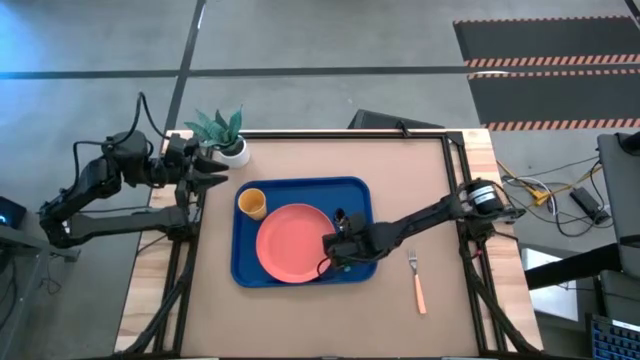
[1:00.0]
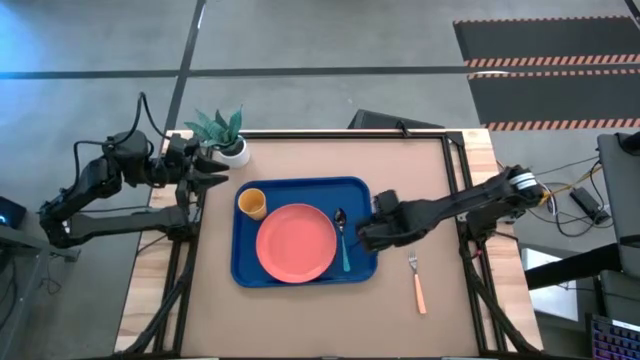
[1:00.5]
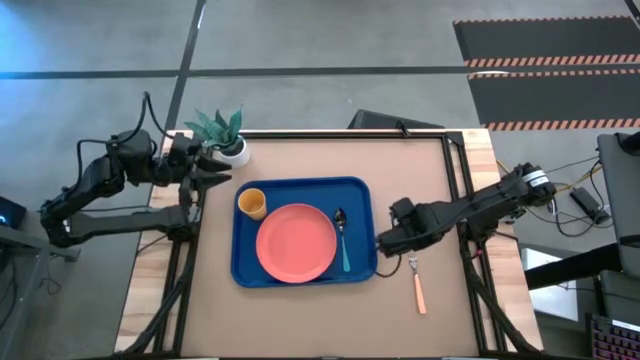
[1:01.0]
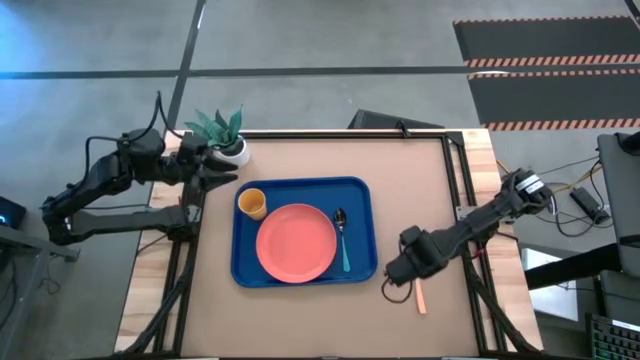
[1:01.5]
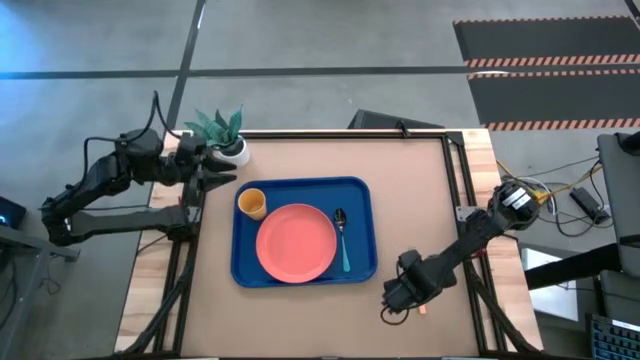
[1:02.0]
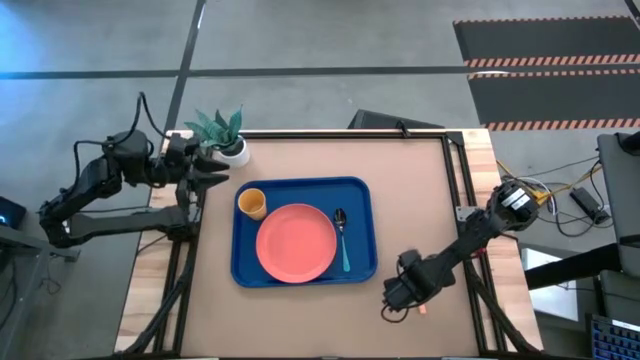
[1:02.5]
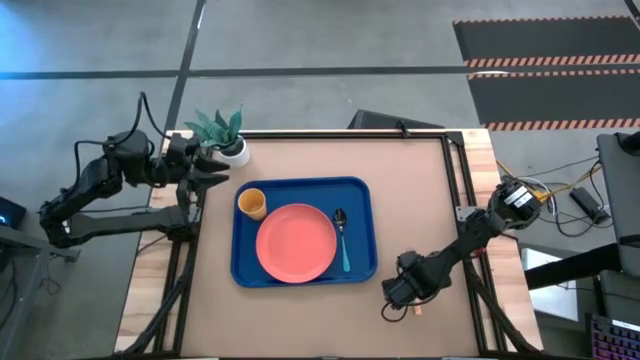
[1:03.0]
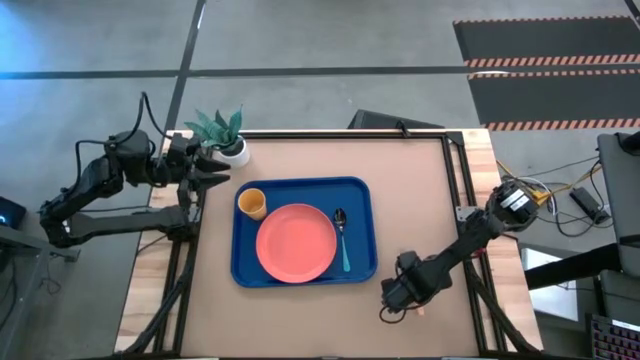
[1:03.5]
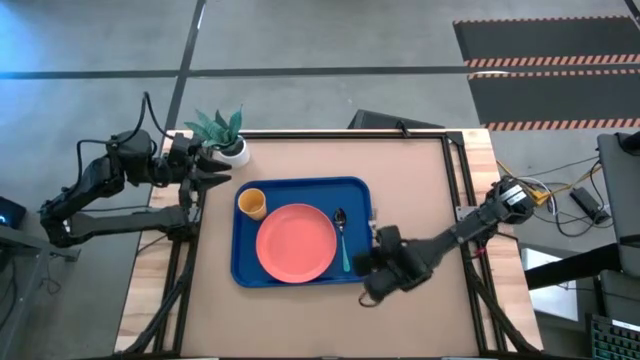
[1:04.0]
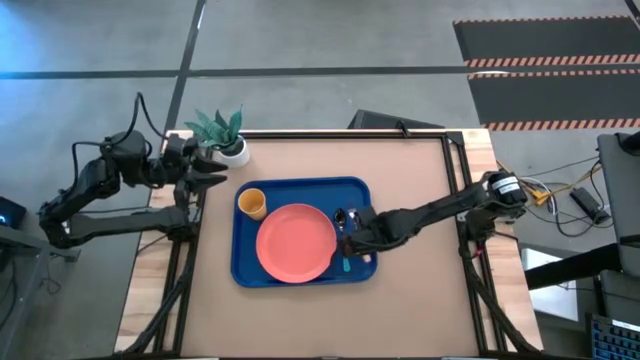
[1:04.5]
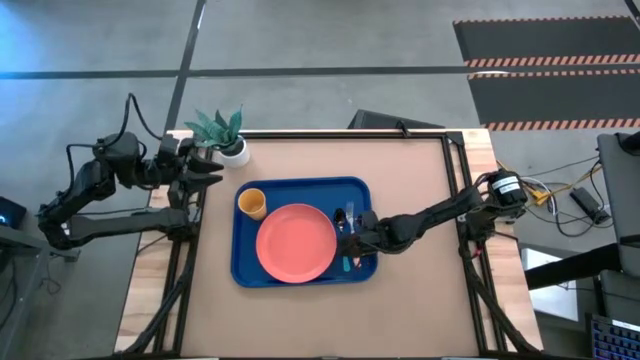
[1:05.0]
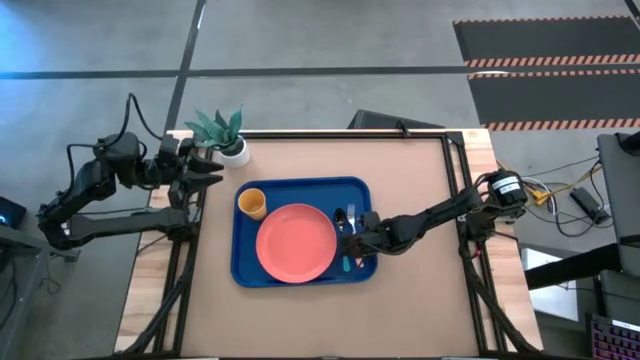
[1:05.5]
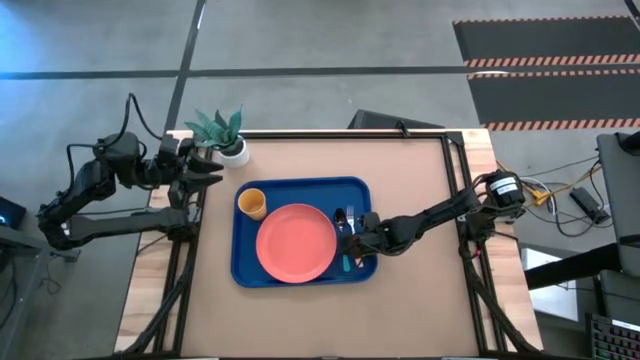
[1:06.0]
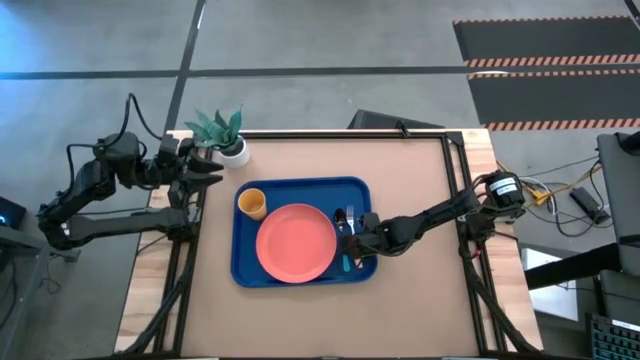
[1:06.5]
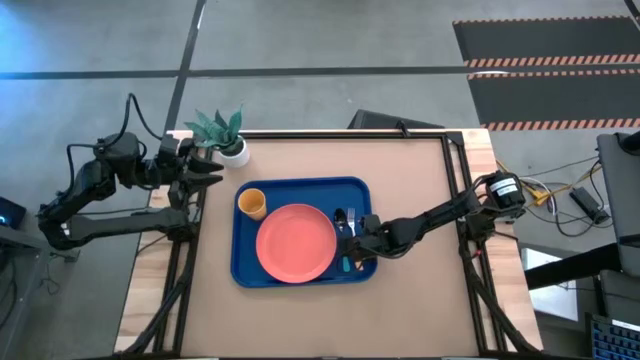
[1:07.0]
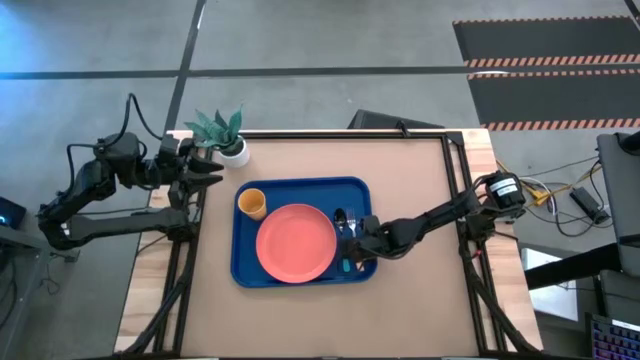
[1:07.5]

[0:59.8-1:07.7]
Task: Pick and place plate/cup/fork/spoon on tray
Put the pink fork on the blue tray to the right of the blue spoon

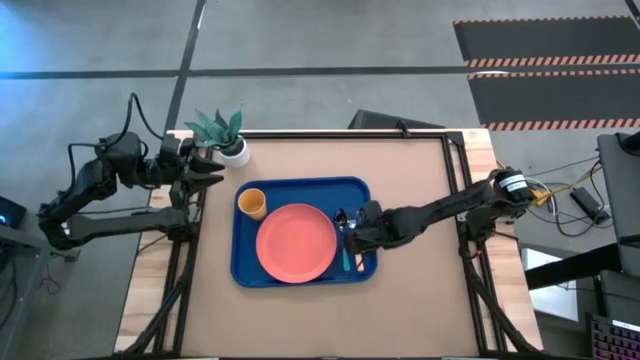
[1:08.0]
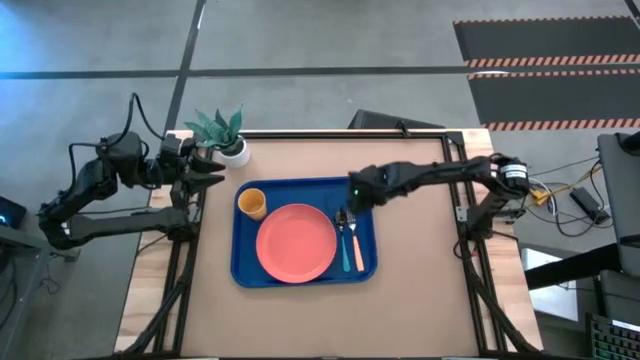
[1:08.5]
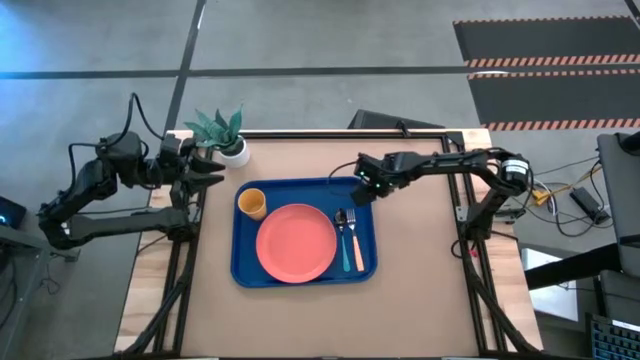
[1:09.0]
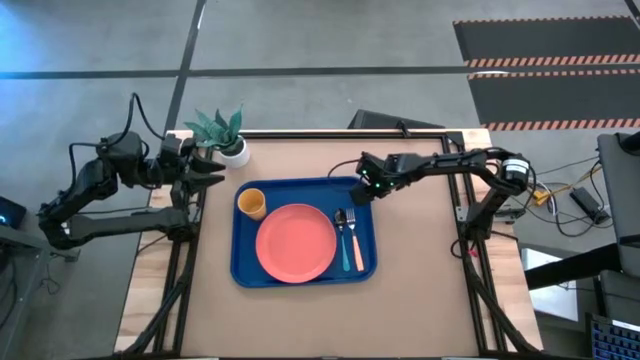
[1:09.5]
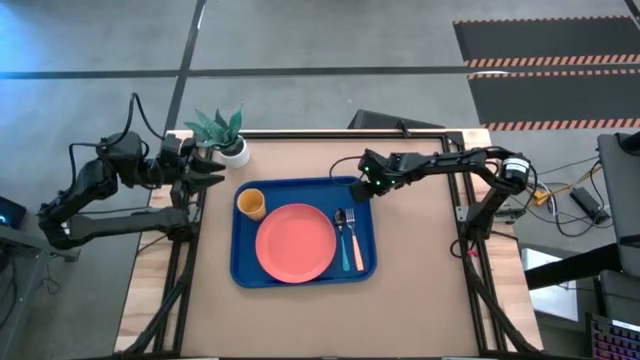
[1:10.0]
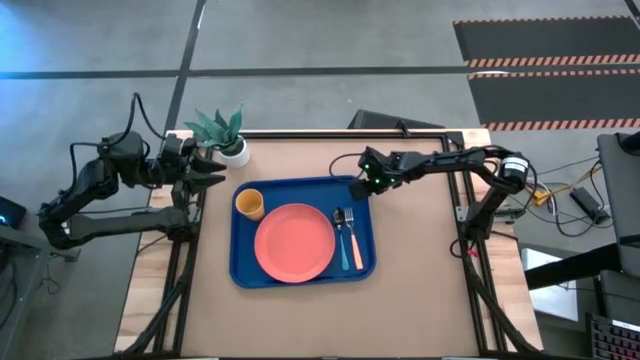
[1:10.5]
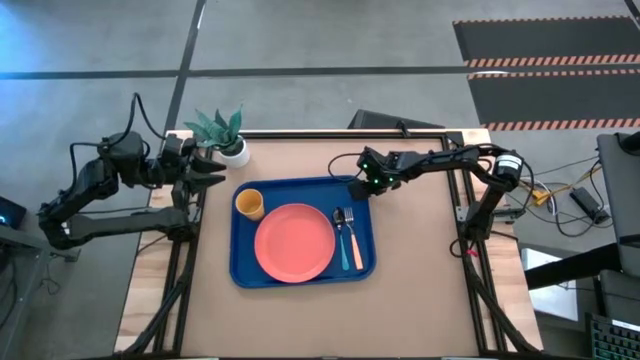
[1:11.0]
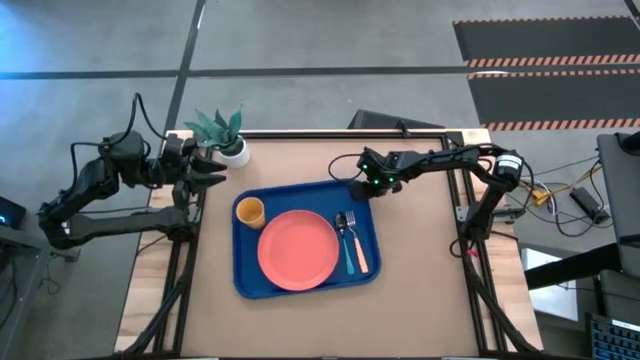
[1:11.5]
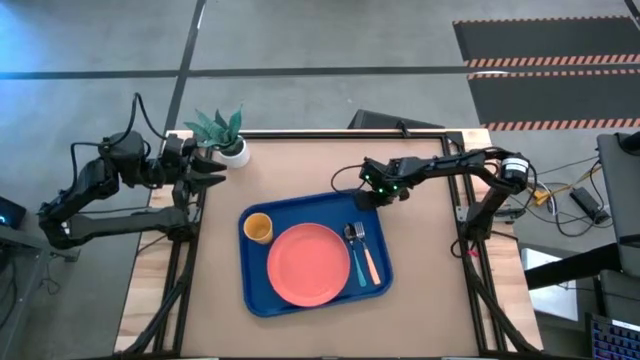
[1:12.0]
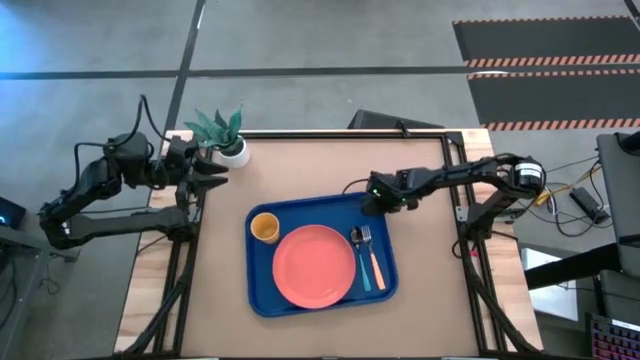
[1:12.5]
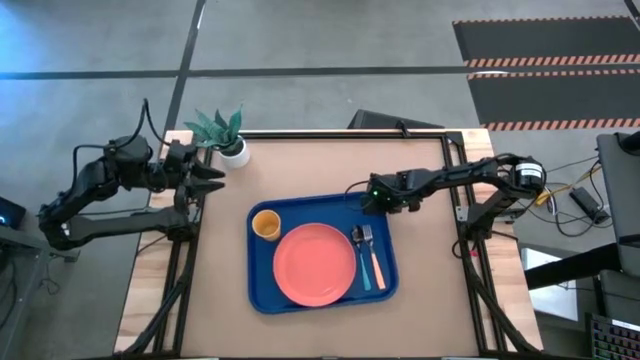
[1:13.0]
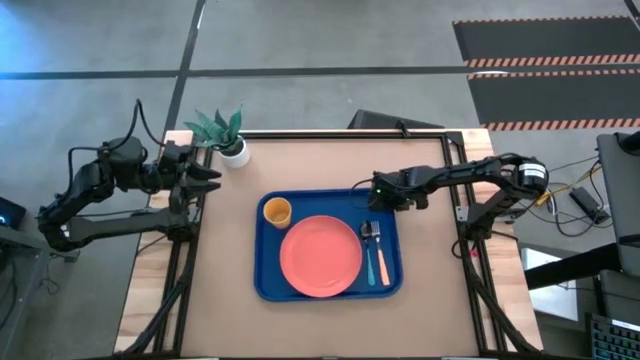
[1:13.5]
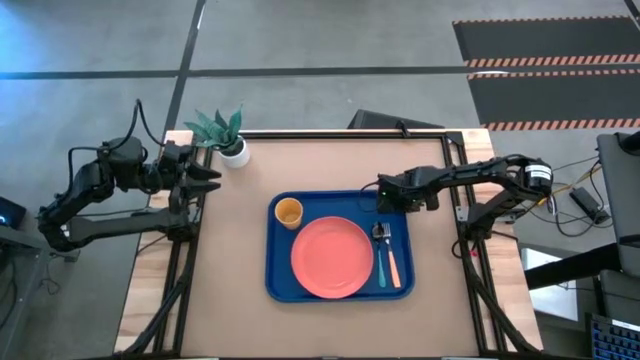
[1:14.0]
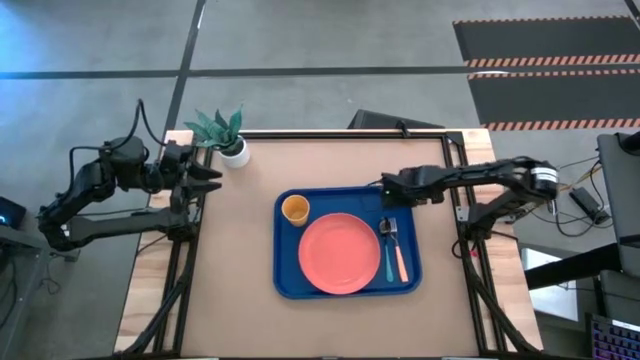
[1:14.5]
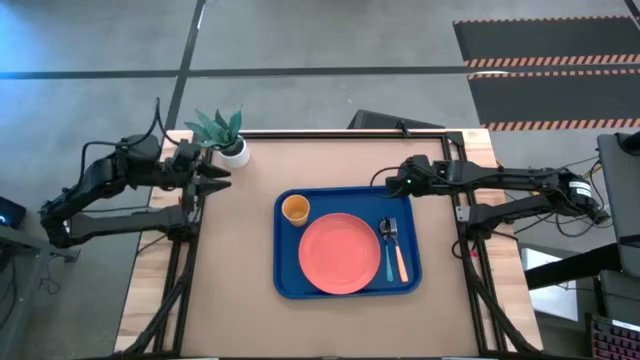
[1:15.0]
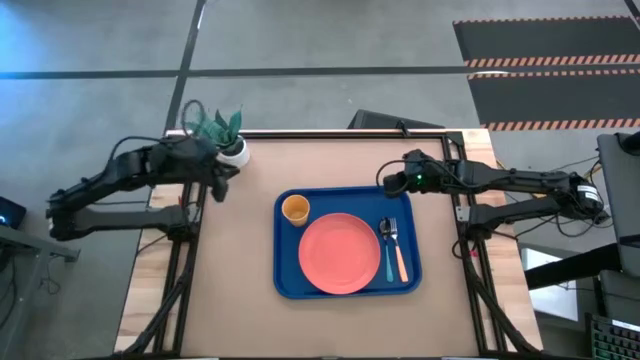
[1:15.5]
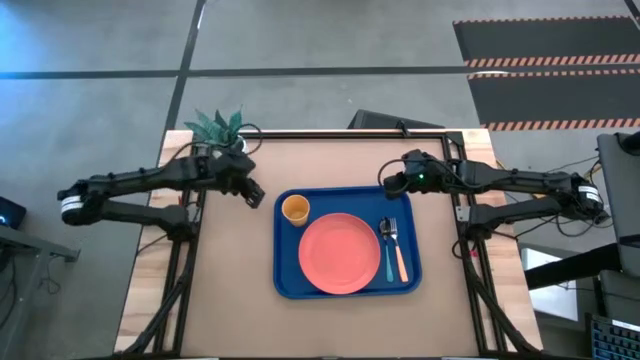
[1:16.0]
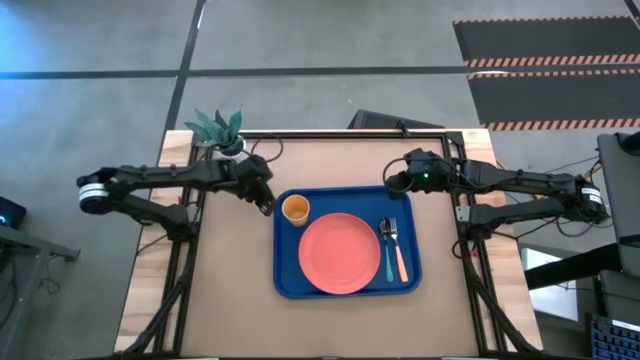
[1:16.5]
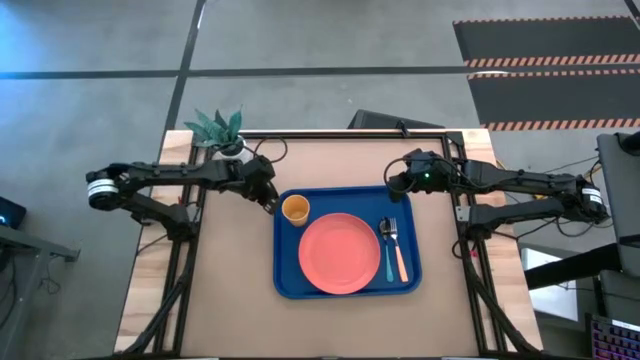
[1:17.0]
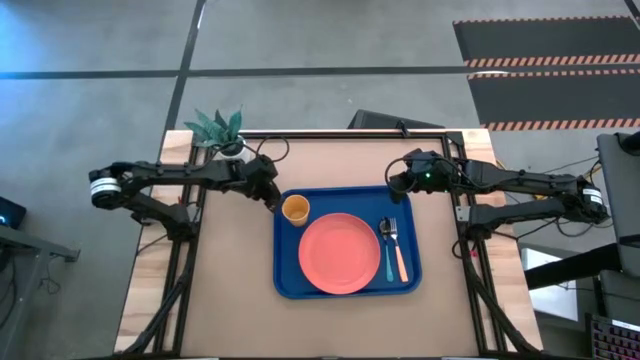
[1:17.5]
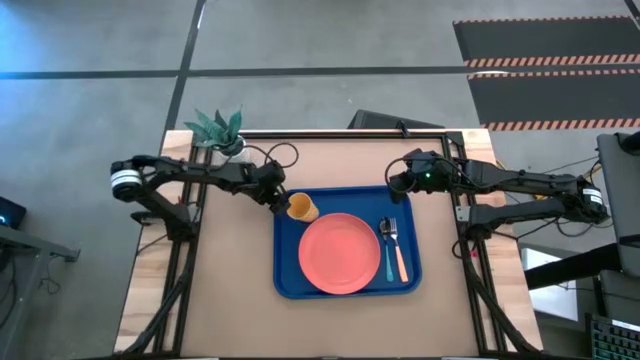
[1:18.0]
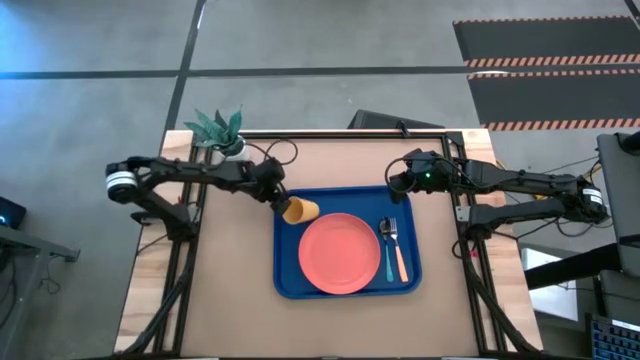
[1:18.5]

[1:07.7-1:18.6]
Adjust the blue tray

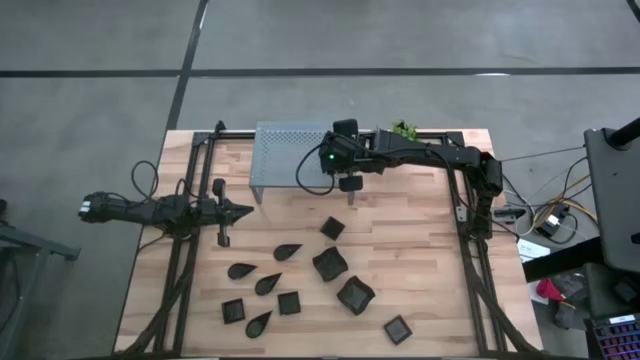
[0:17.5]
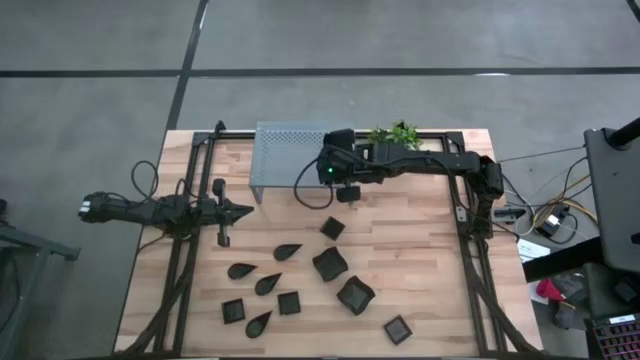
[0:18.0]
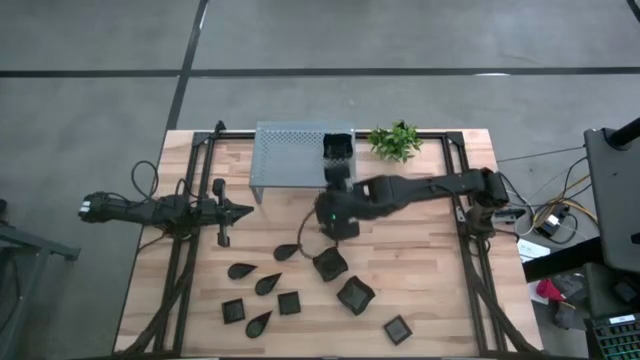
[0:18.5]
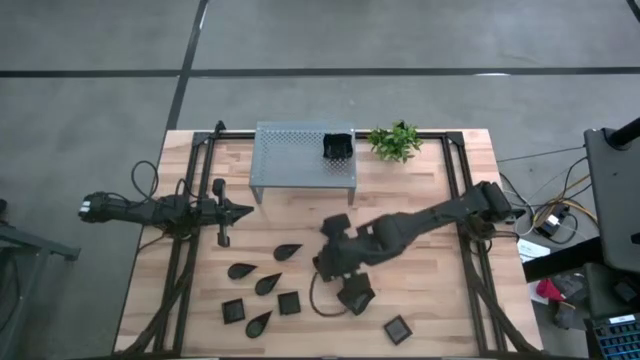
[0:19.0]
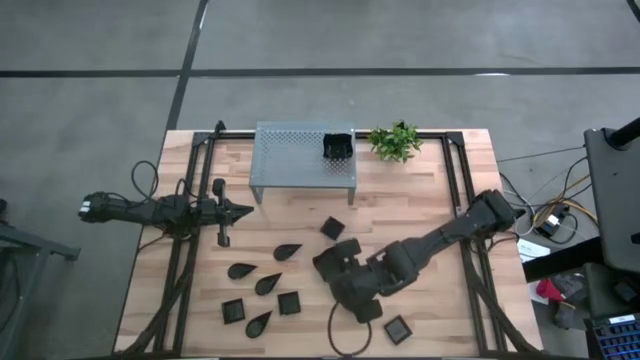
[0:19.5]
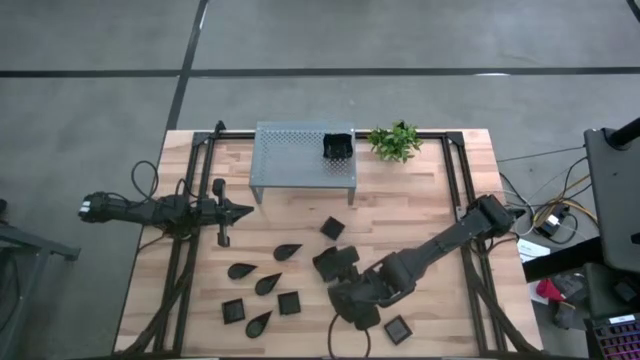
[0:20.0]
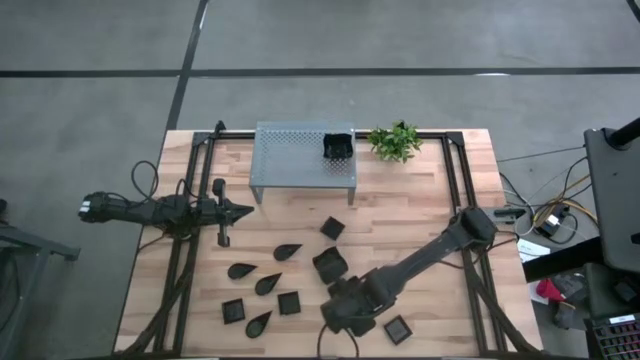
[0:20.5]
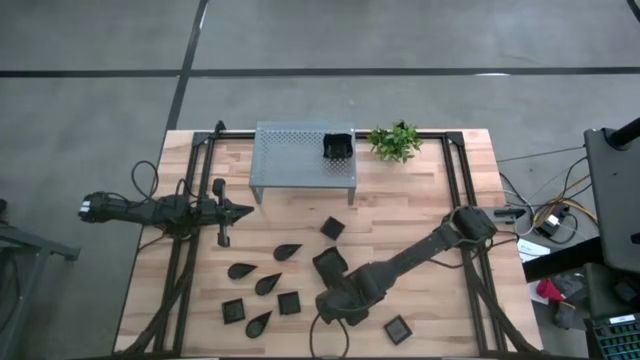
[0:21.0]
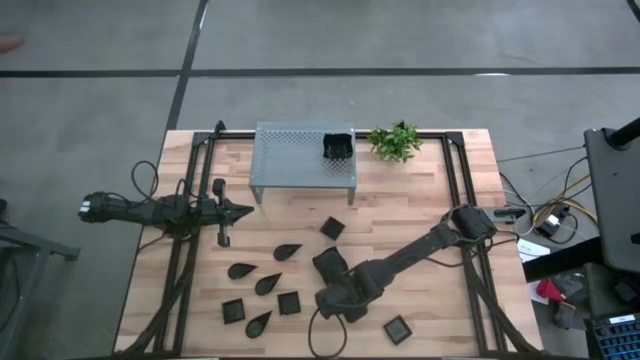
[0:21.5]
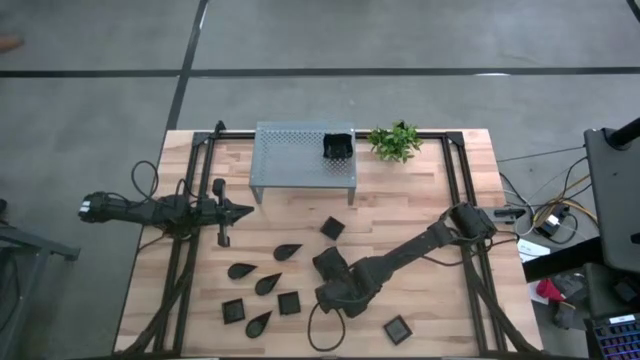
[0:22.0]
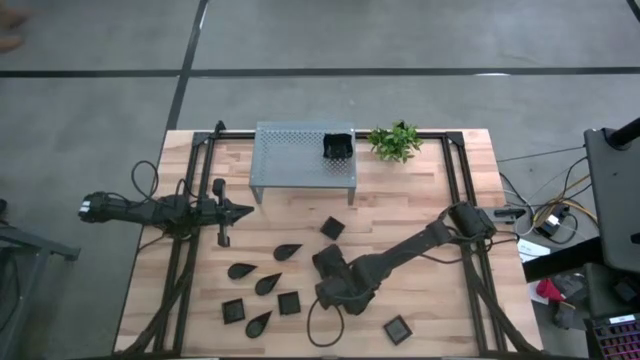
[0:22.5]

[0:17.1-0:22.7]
Task: Pick & Place Mini shaped plates
Stack the black distorted square plate on top of the black distorted square plates on the shelf
